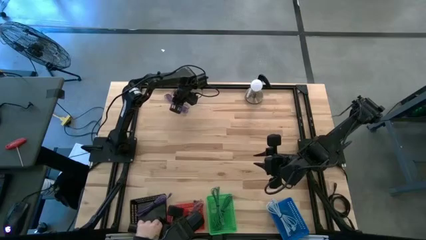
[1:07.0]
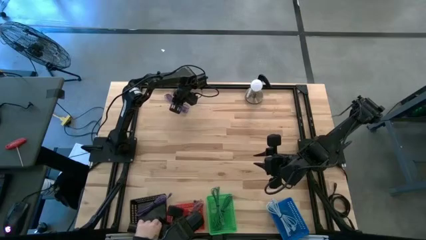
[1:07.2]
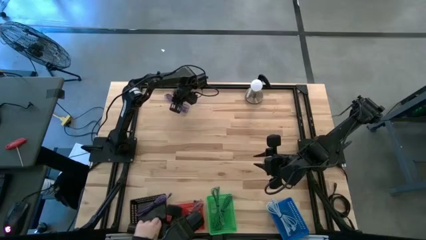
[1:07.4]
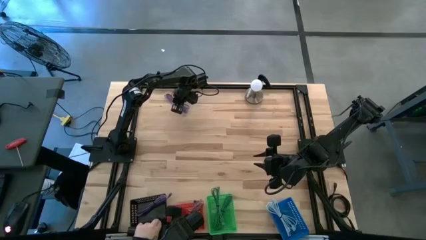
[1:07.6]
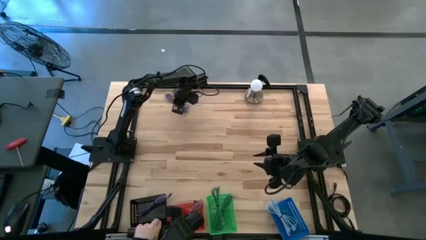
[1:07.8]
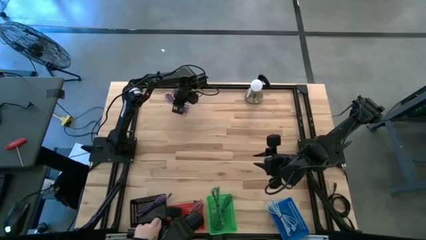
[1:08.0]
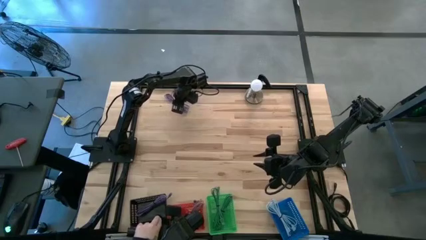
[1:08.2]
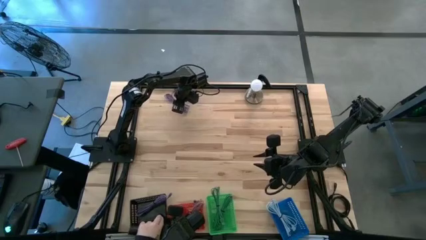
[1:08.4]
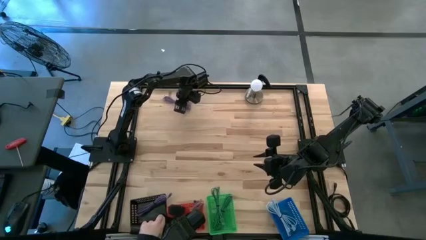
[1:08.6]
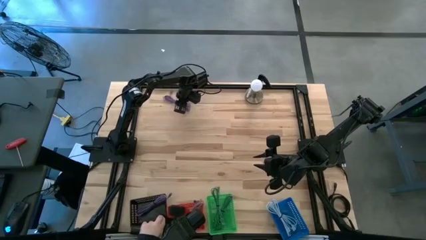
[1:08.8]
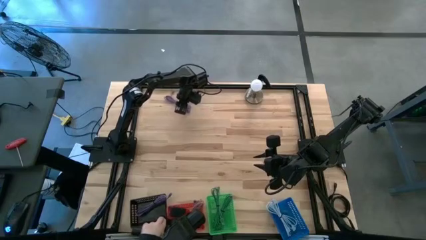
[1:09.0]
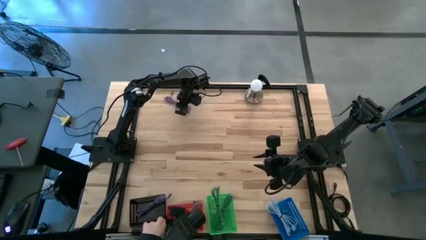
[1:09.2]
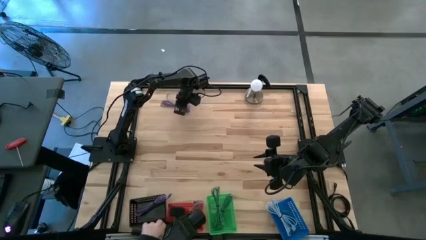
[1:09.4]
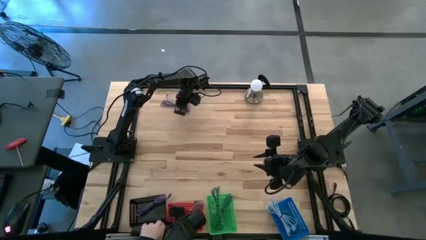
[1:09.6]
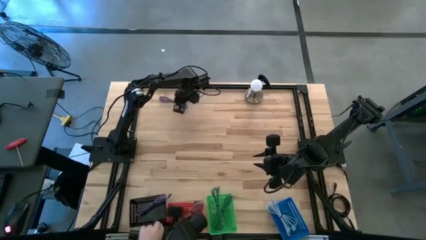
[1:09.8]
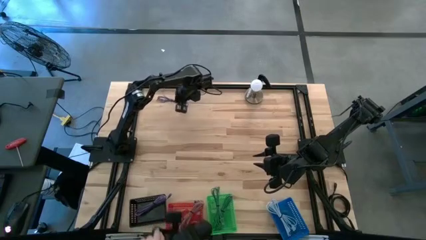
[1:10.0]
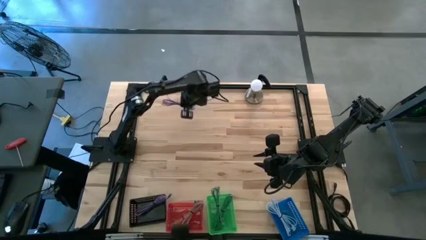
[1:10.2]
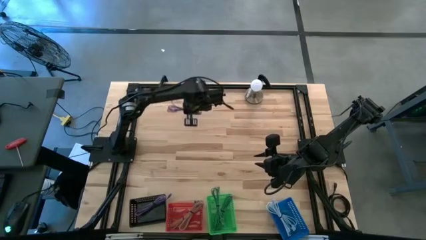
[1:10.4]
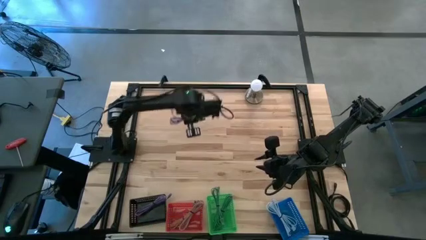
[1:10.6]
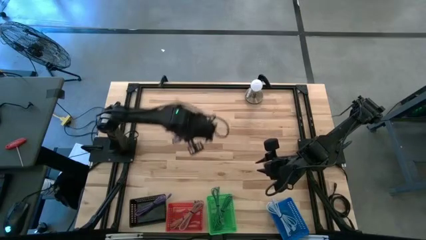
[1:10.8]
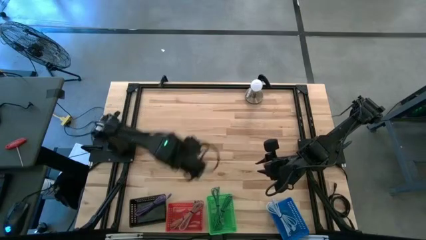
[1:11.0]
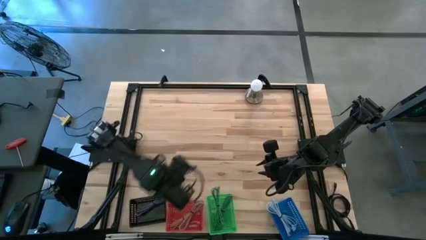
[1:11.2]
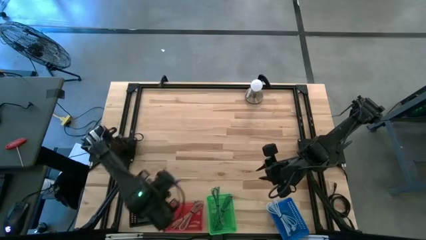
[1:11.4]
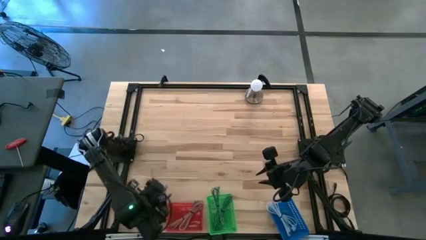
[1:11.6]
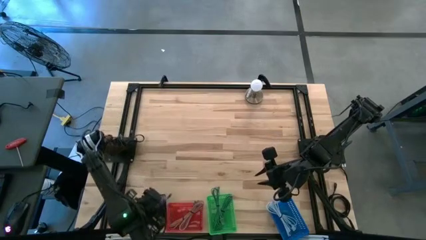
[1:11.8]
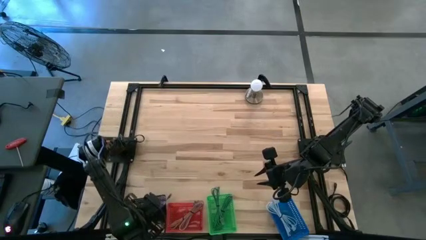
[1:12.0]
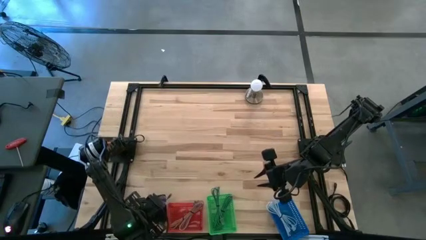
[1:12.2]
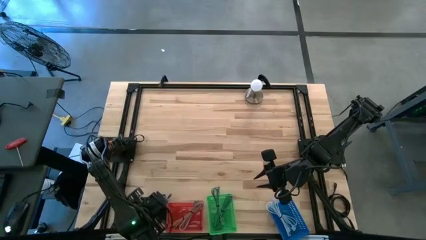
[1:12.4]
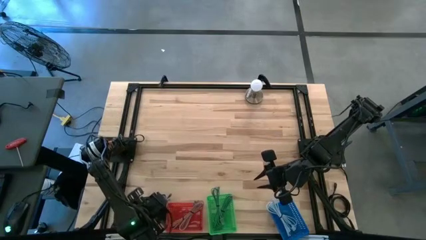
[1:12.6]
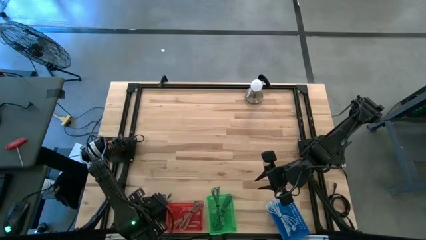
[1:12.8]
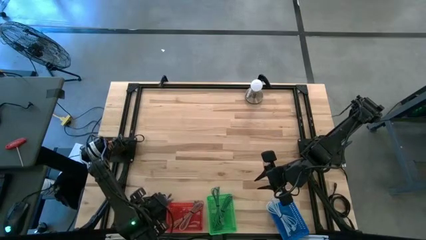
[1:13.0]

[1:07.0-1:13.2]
Task: Pick & Place USB Port
Put the purple charger cable into the black bin

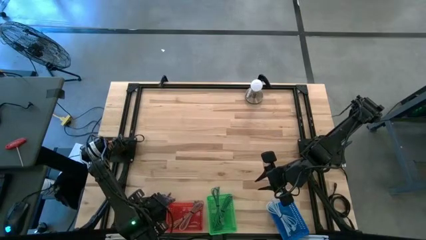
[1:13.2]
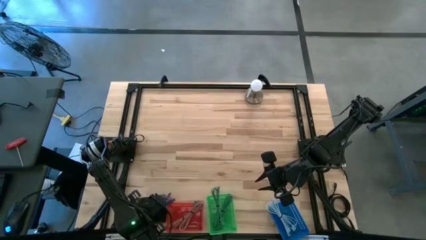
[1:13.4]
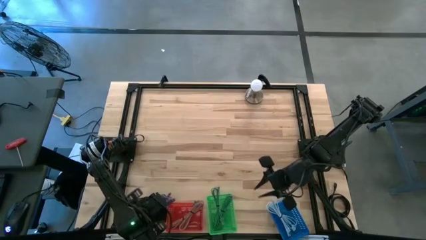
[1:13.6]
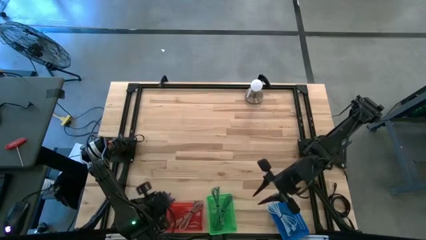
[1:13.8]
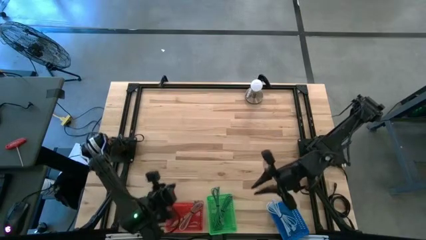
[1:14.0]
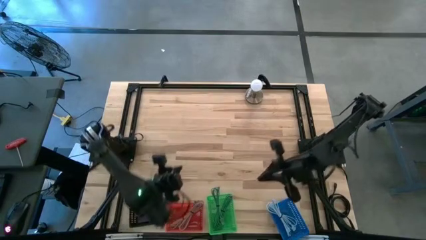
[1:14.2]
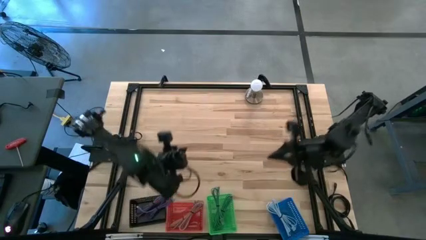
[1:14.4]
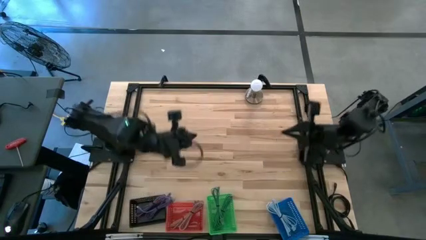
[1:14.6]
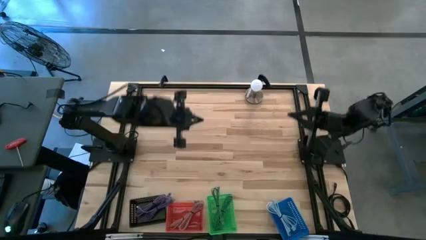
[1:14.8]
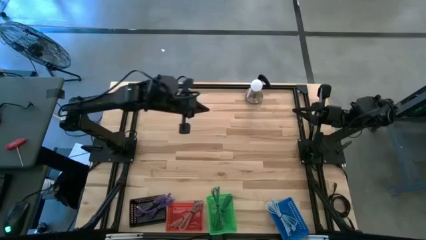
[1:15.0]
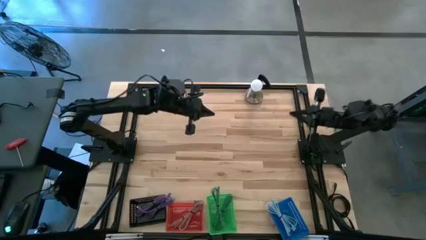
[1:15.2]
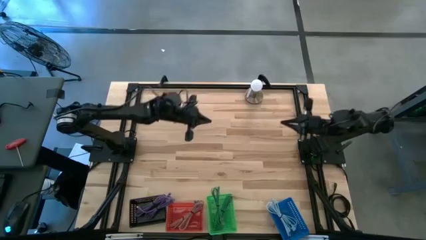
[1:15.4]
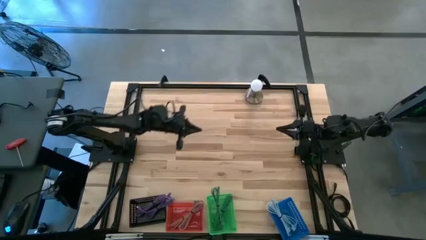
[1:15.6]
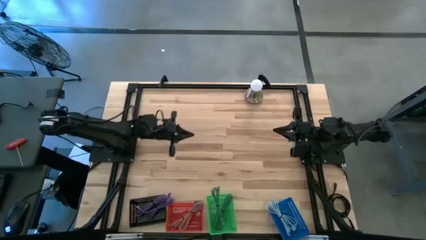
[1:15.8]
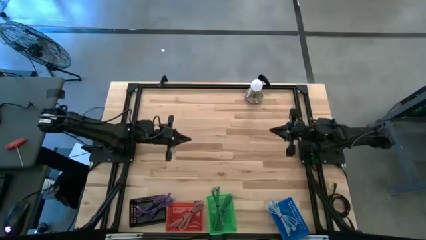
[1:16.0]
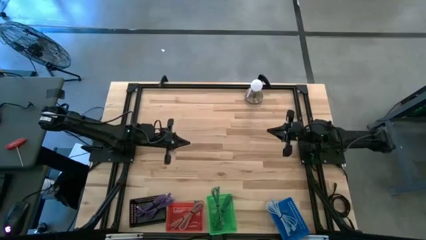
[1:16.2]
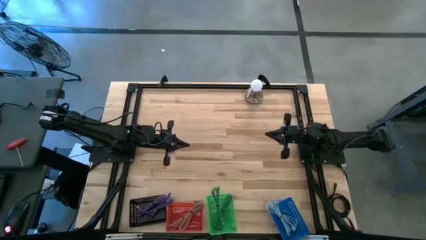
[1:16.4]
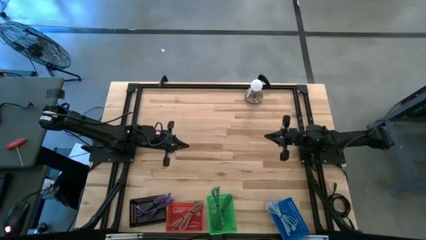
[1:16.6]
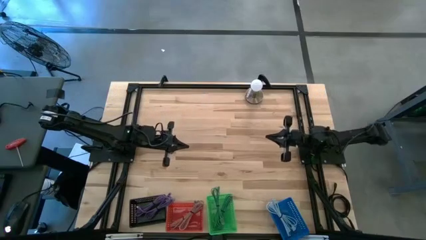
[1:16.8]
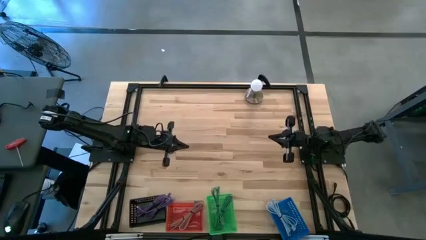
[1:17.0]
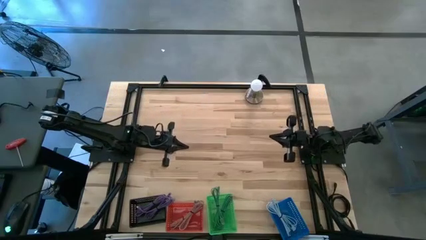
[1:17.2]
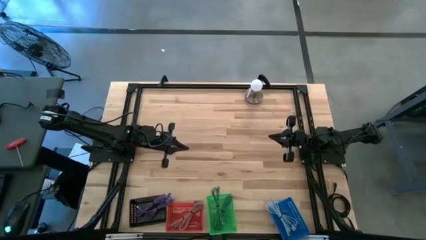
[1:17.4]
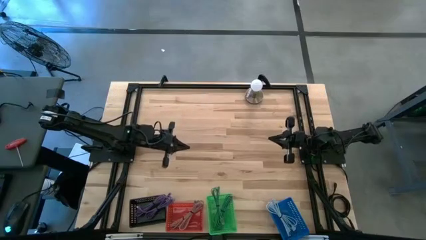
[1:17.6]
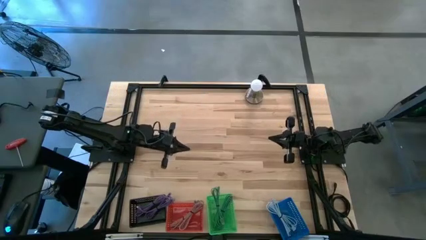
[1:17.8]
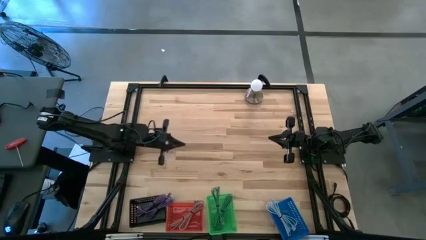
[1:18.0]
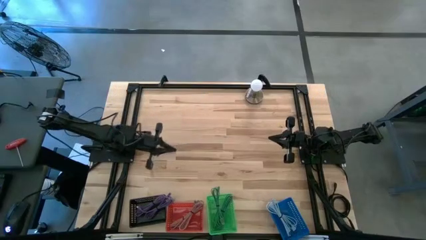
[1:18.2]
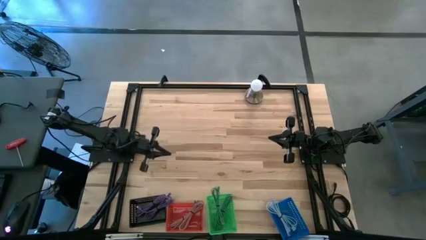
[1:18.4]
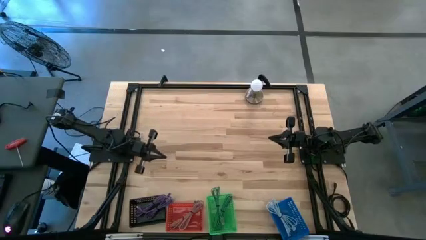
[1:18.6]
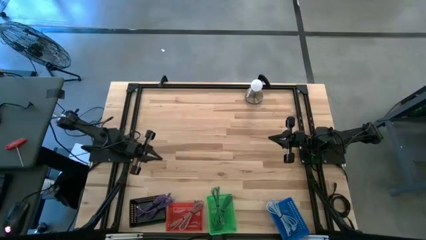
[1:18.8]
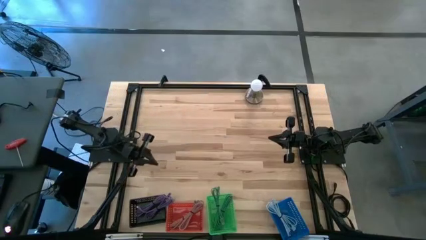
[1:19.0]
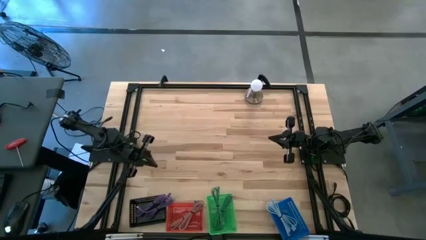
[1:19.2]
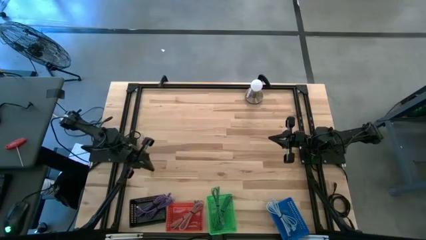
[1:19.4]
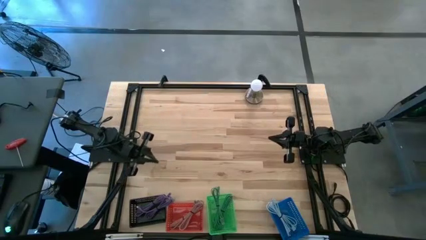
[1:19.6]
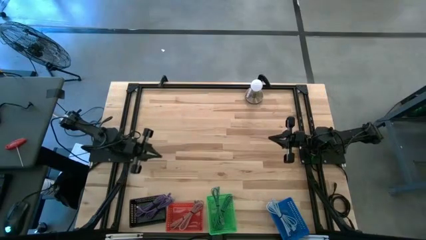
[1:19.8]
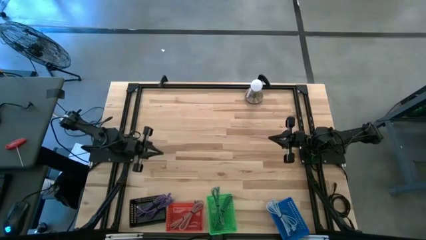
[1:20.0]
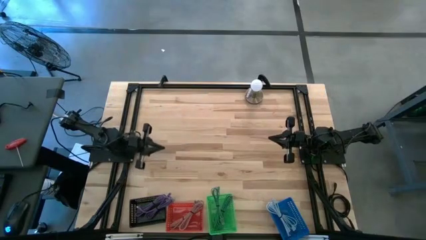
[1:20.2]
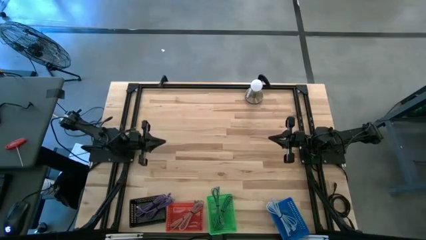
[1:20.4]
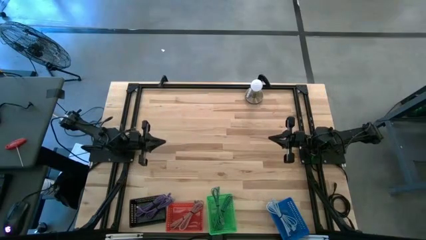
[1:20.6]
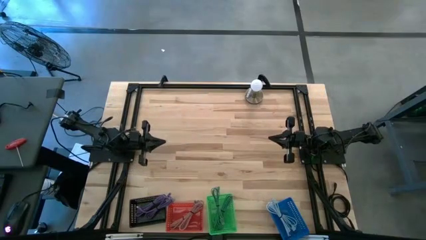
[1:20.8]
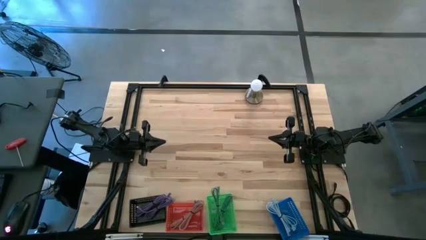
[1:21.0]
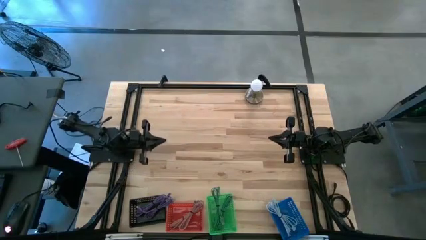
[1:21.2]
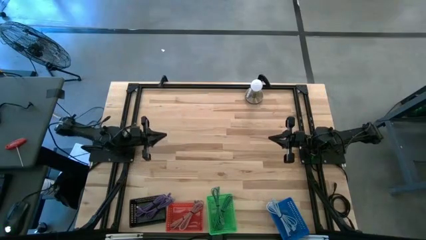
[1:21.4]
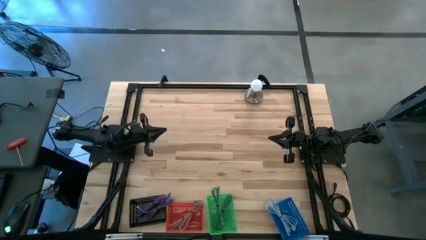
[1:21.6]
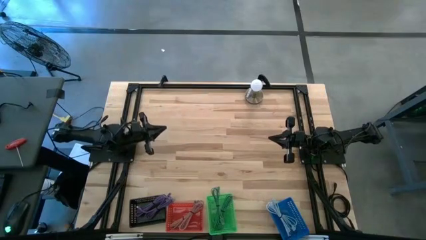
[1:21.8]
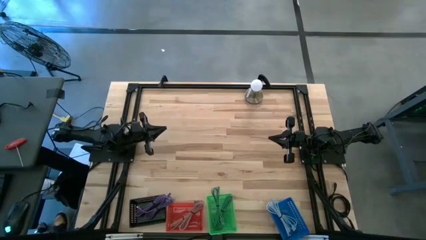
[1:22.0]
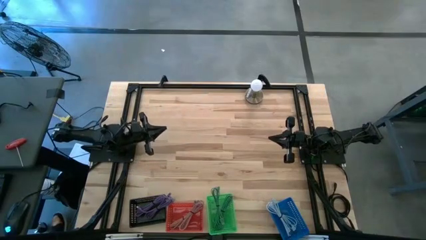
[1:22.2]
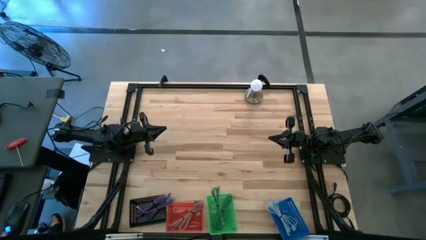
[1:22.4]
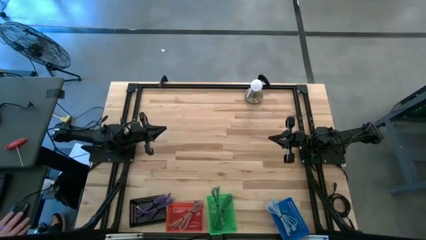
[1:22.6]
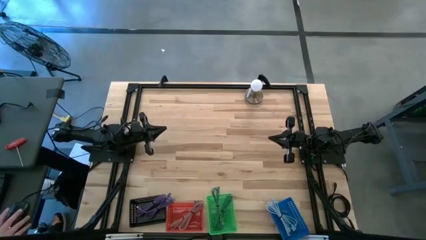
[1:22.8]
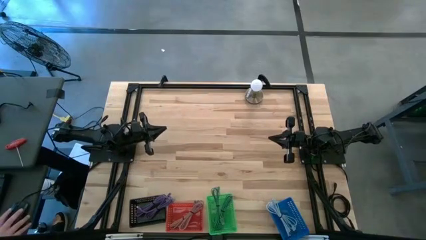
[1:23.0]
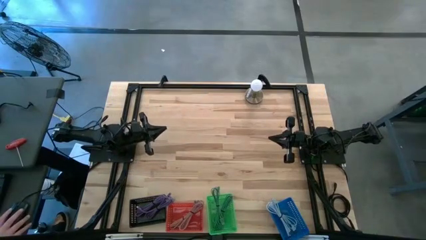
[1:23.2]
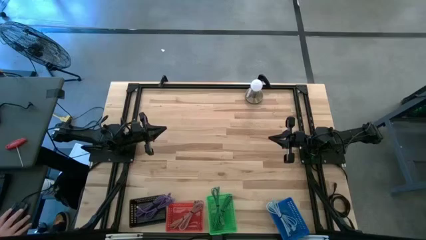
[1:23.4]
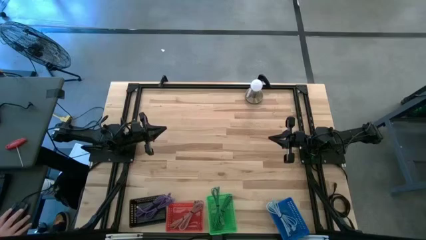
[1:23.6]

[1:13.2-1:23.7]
Return to Home Position
